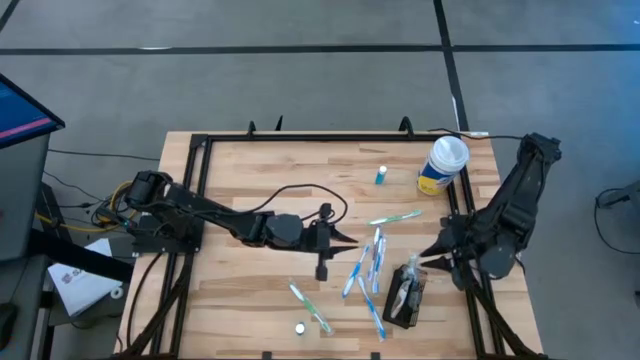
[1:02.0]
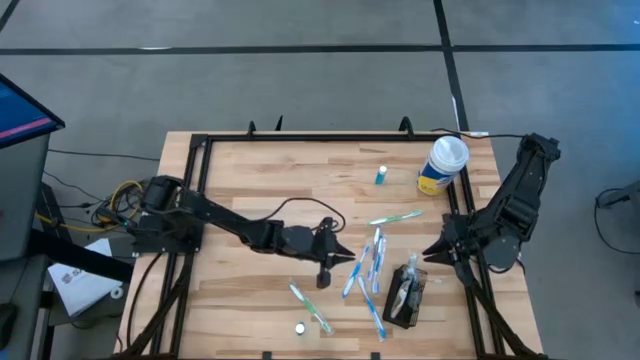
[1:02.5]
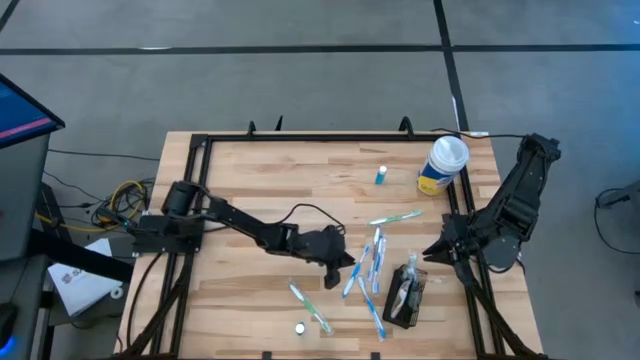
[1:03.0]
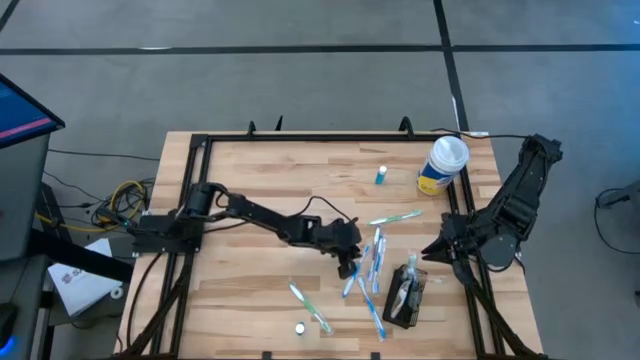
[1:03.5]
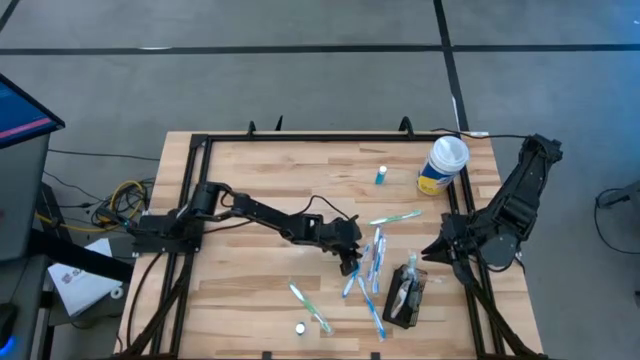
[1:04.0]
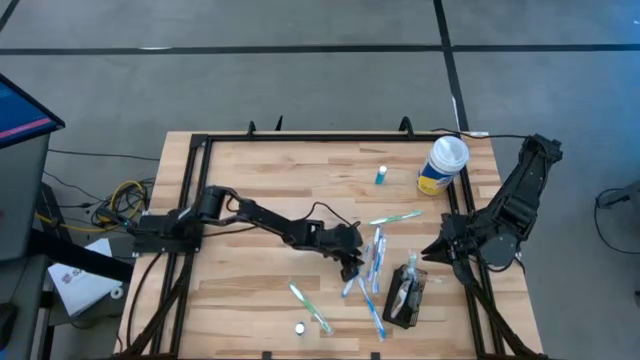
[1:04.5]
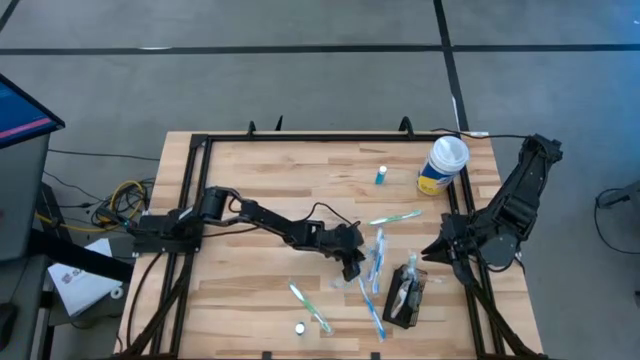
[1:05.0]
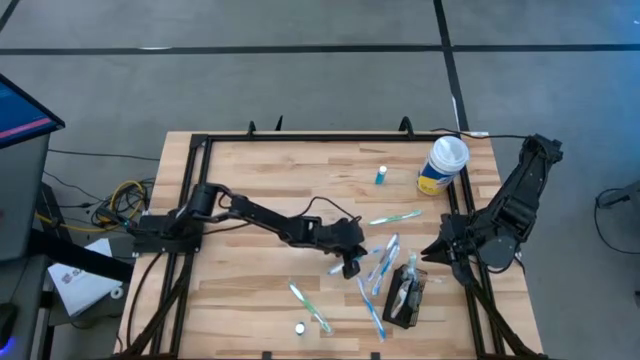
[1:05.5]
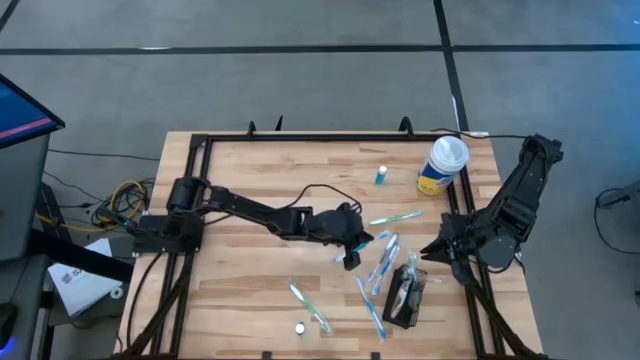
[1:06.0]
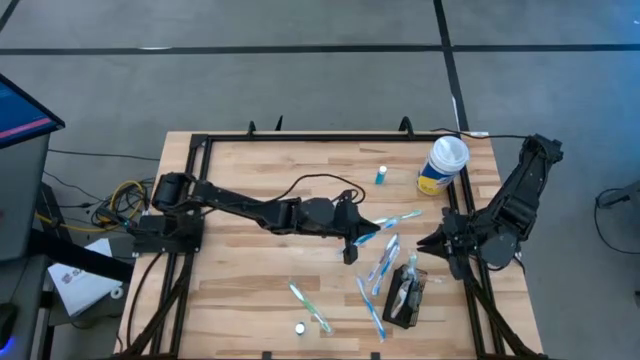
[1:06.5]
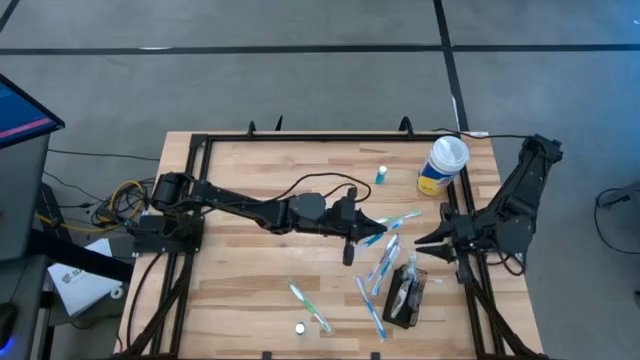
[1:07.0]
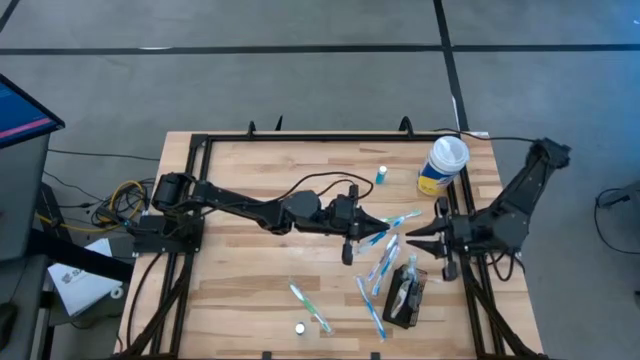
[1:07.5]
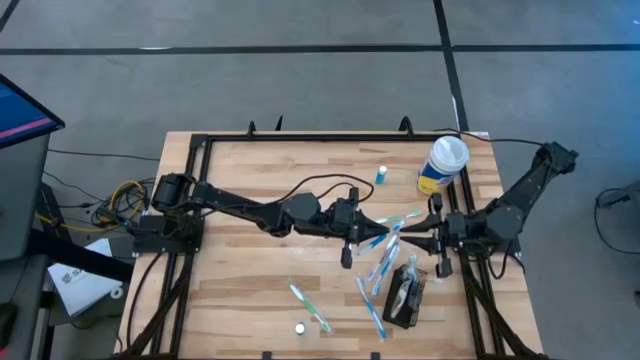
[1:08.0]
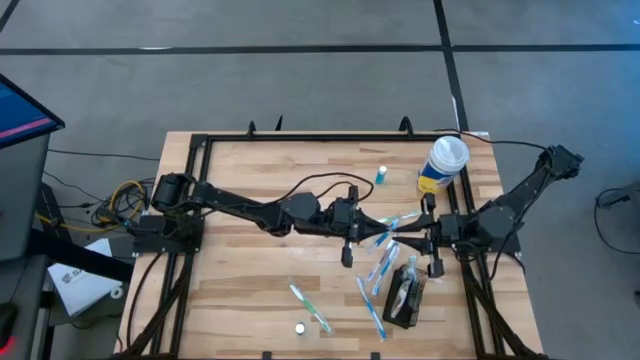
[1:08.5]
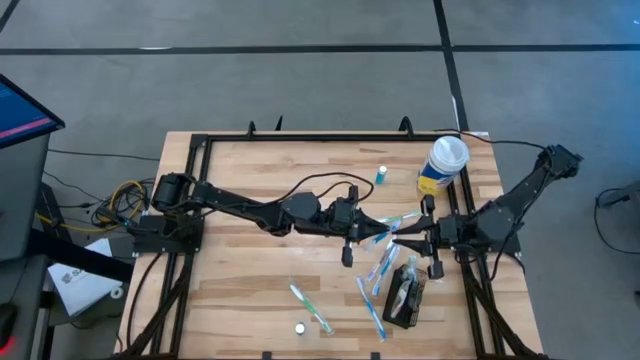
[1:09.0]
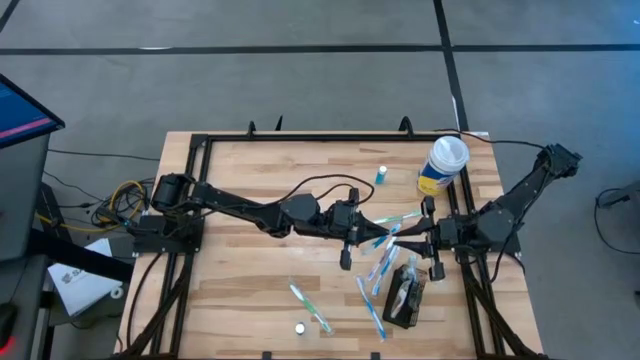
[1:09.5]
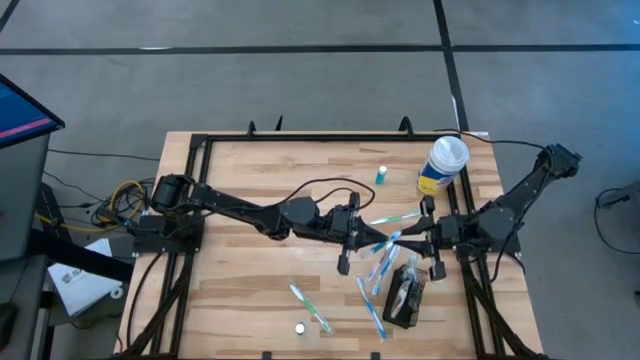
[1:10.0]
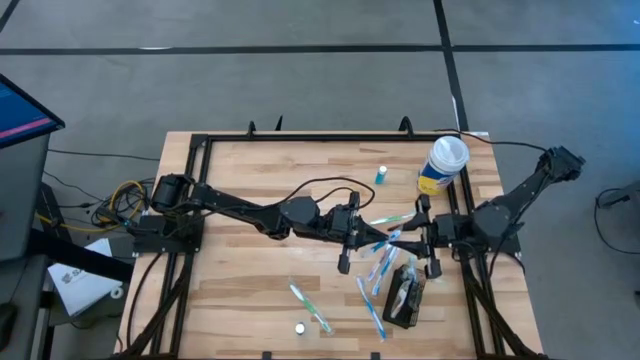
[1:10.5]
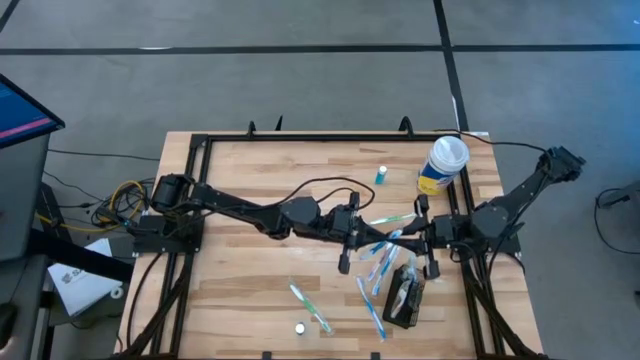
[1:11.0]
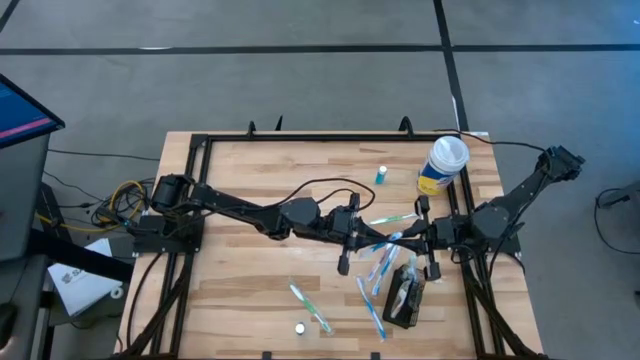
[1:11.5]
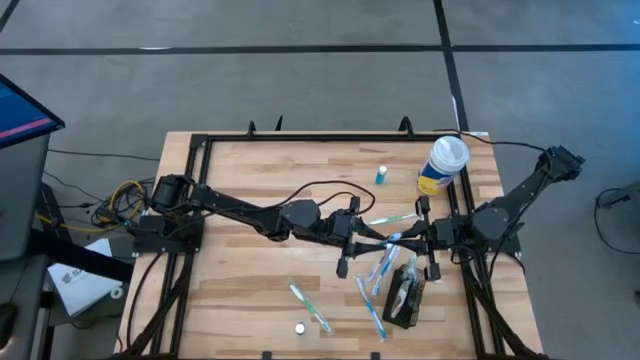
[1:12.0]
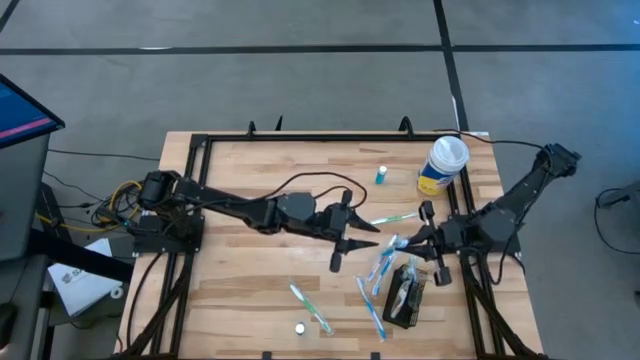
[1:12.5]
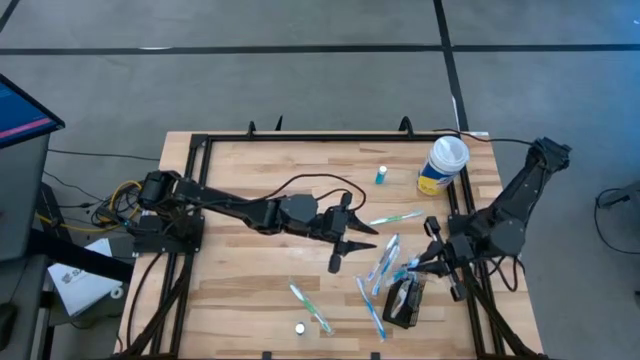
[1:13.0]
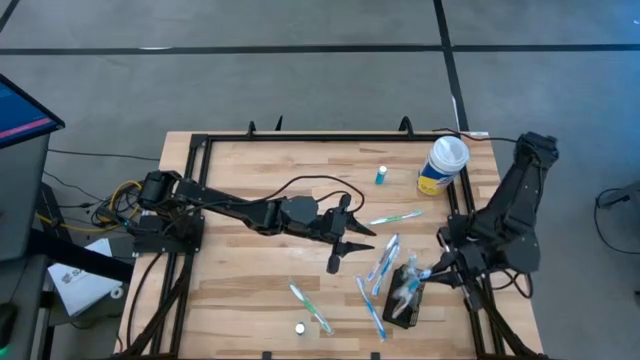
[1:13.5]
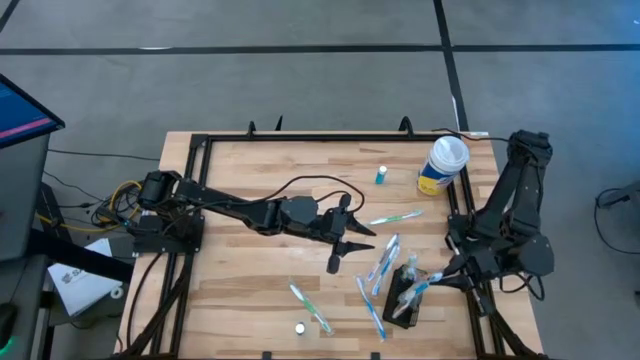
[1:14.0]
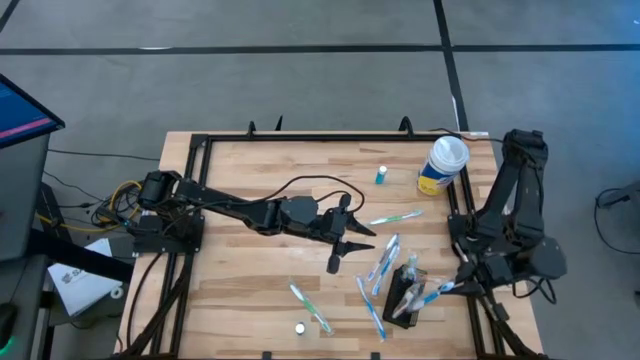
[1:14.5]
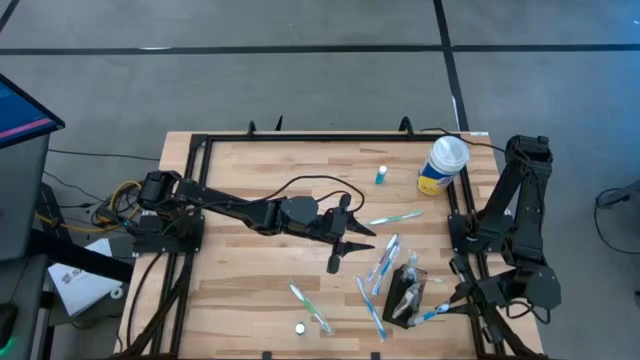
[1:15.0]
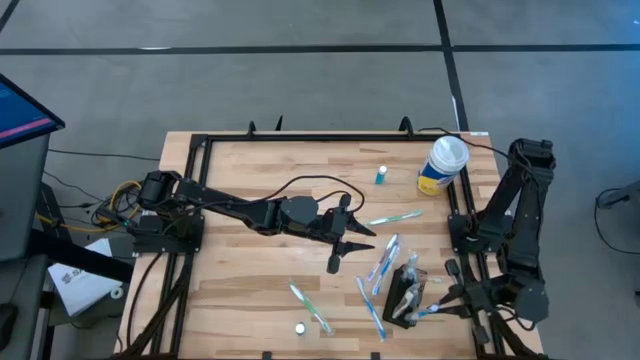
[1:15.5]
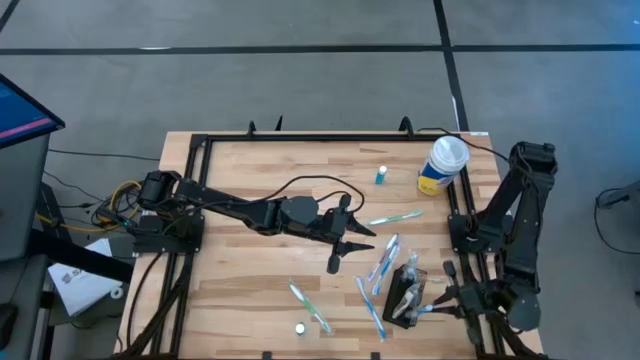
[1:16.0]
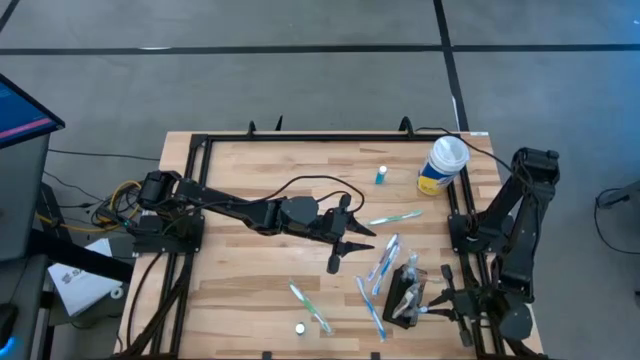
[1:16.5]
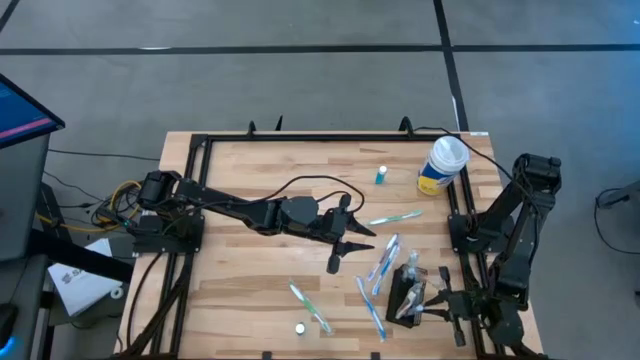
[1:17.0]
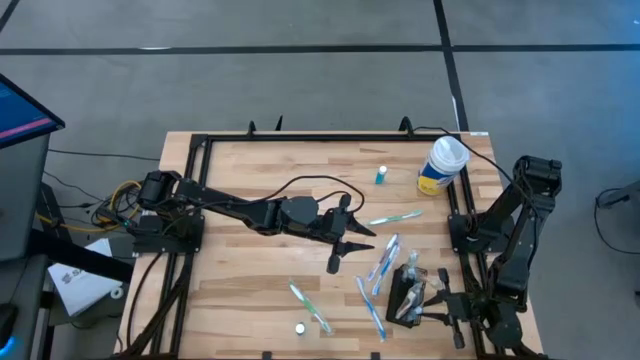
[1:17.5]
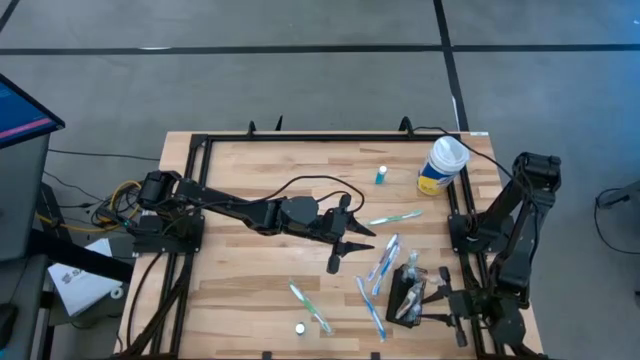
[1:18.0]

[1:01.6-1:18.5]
Task: Pick & Place toothbrushing station
Put the blue toothbrush into the black wire organizer

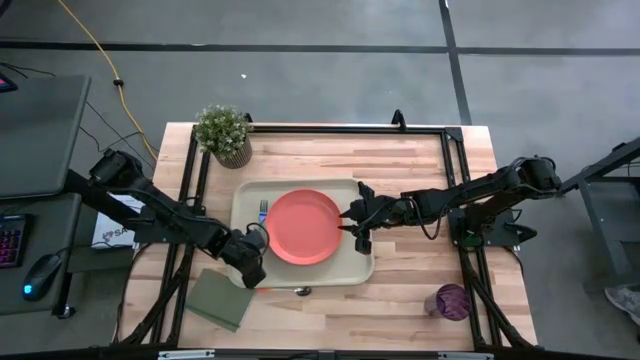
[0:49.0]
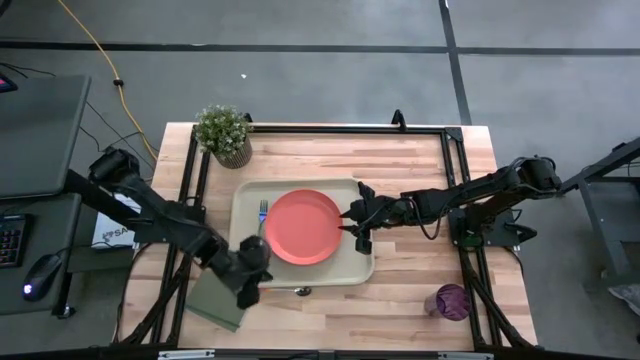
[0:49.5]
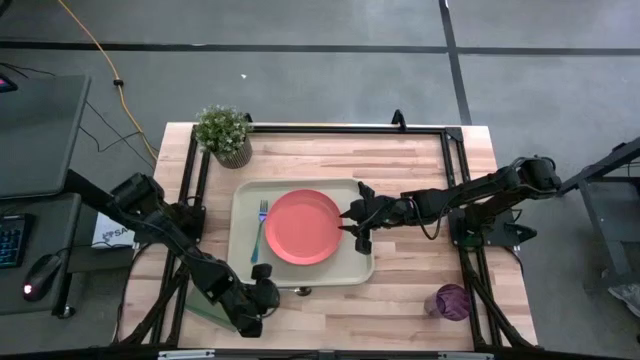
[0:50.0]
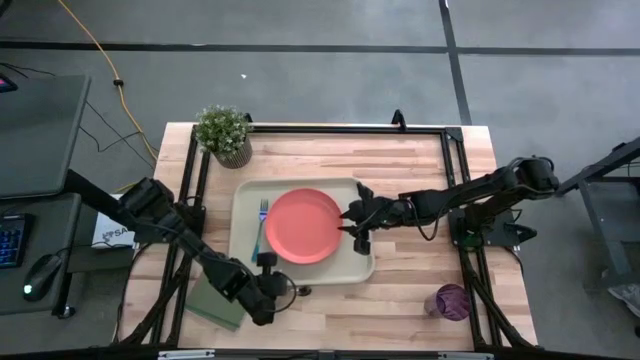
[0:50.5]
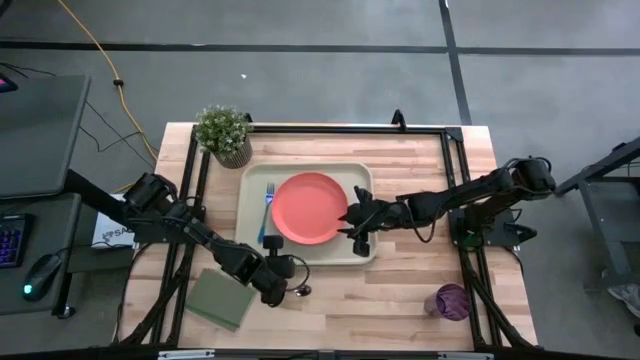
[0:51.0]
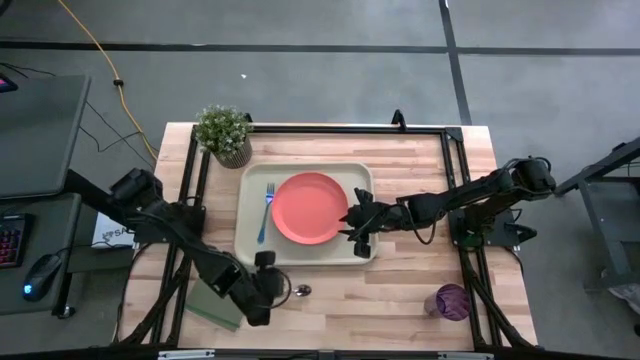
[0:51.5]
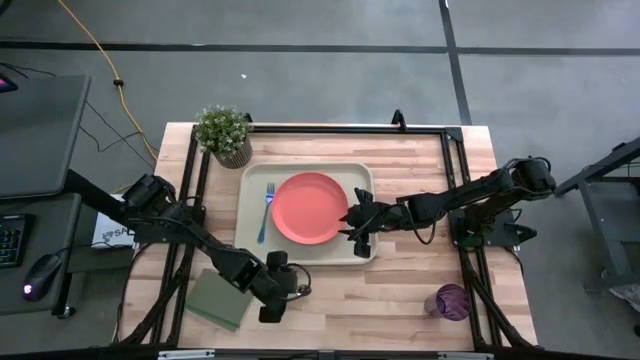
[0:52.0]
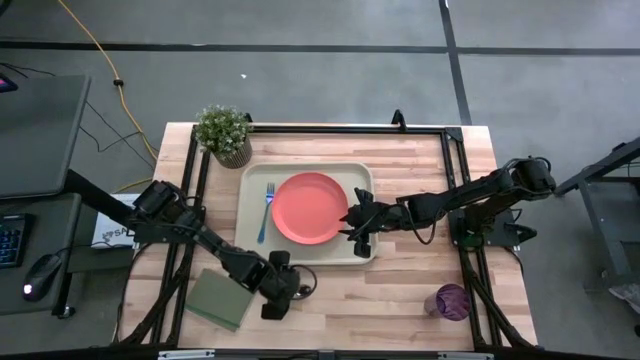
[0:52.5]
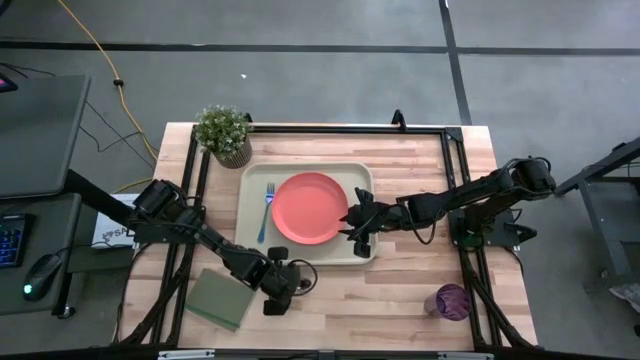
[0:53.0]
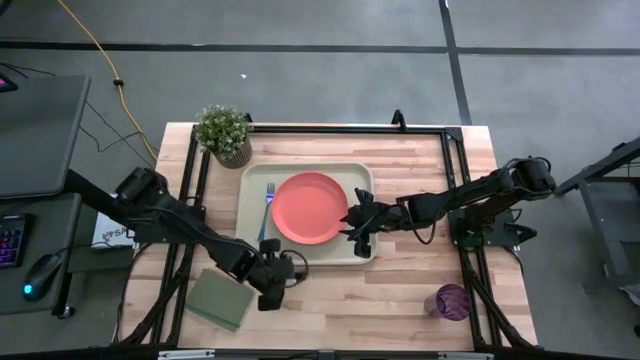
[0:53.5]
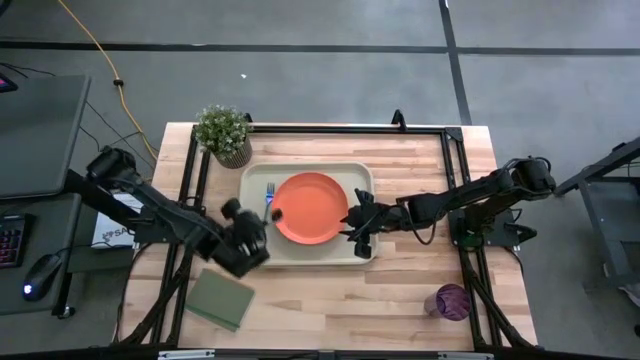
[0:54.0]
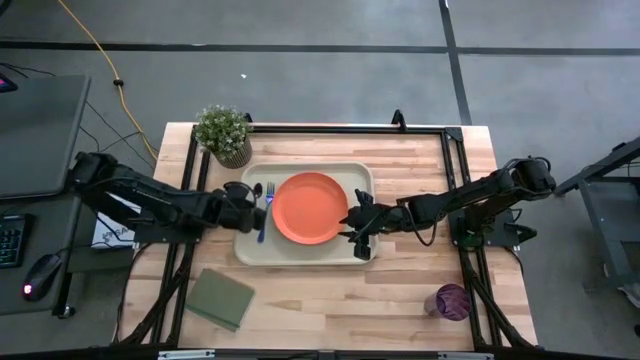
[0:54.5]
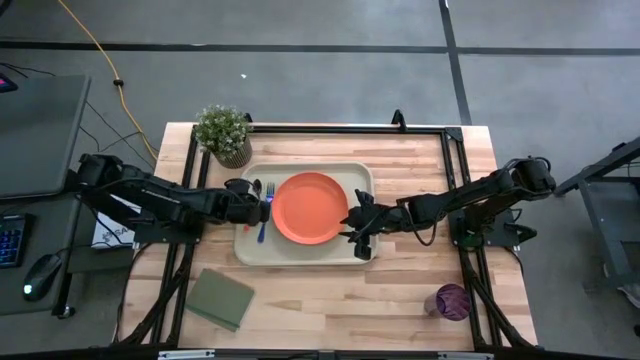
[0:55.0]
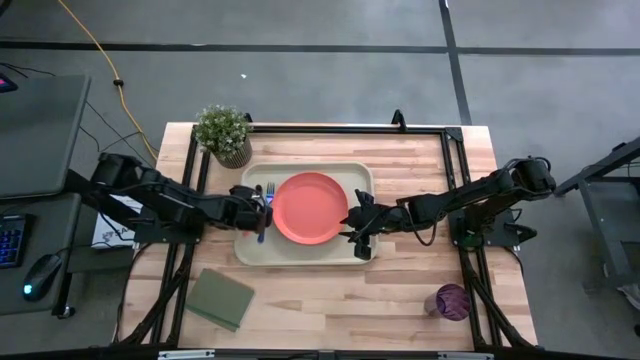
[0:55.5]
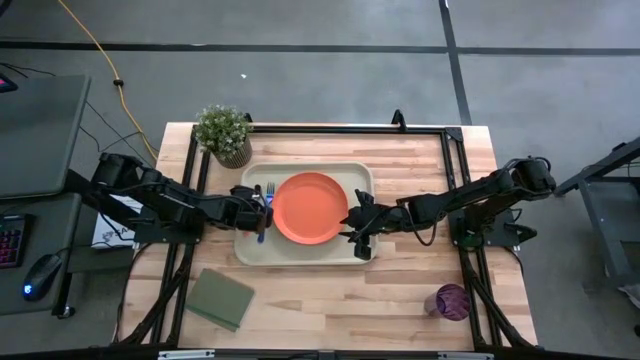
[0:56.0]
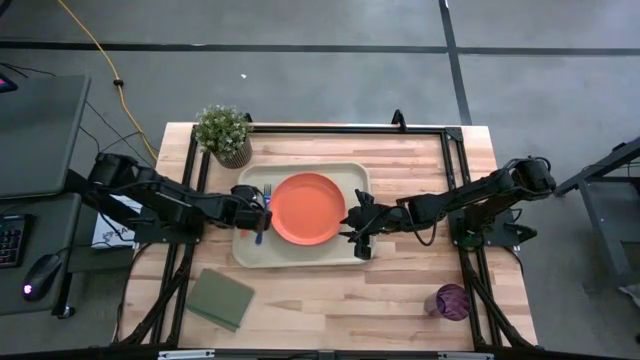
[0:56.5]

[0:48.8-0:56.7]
Task: Pick and place plate/cup/fork/spoon on tray
Put the orange spoon beside the blue fork on the gray tray
